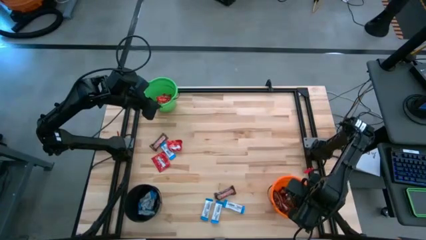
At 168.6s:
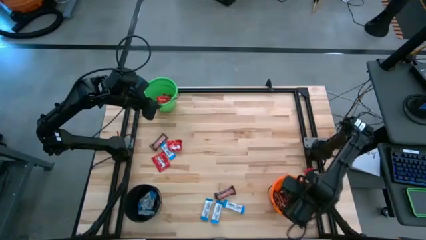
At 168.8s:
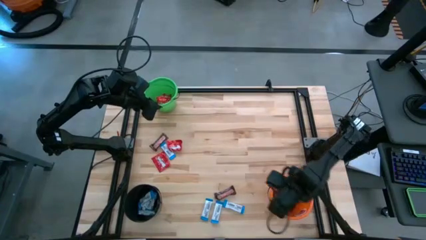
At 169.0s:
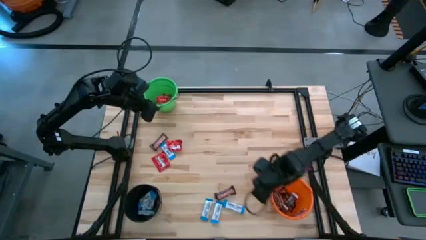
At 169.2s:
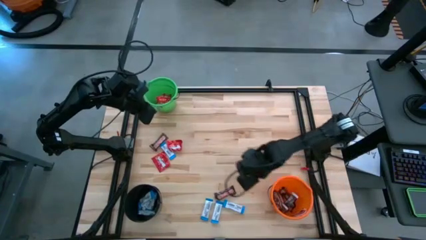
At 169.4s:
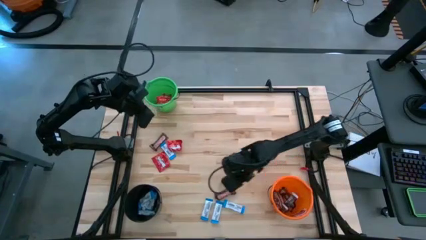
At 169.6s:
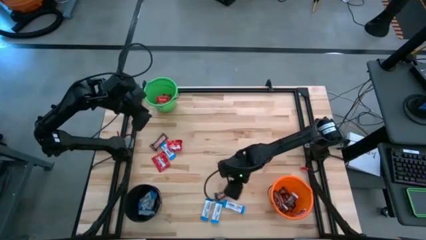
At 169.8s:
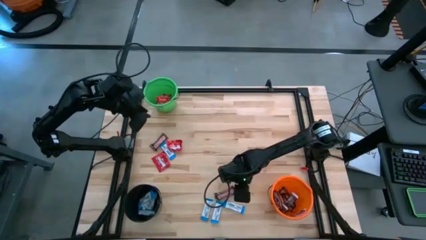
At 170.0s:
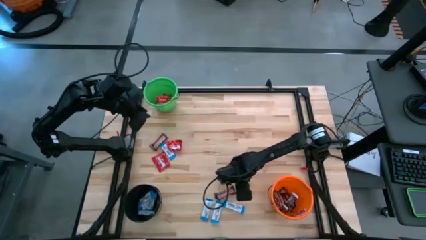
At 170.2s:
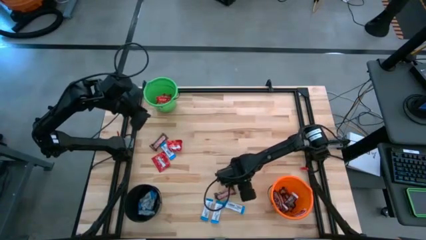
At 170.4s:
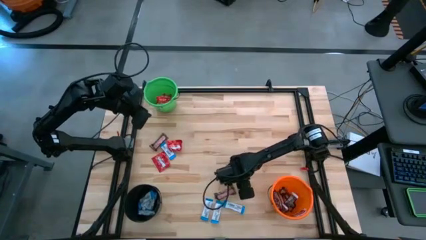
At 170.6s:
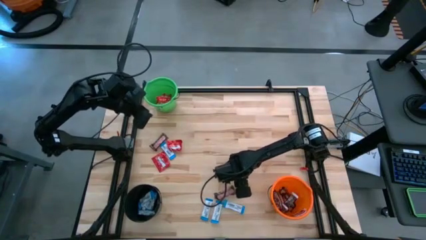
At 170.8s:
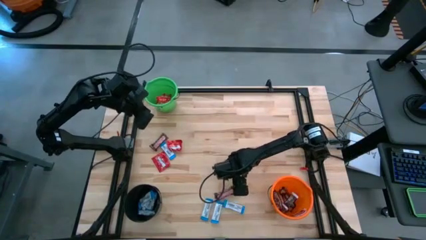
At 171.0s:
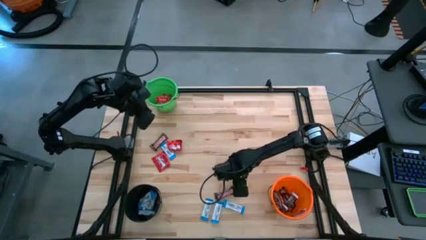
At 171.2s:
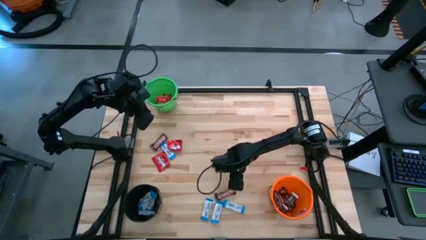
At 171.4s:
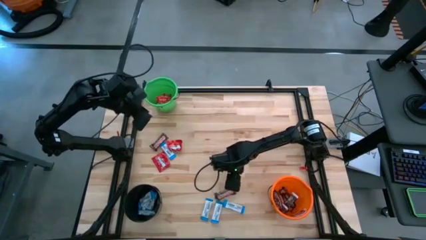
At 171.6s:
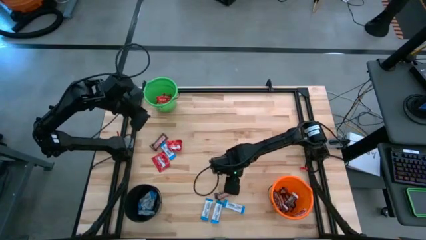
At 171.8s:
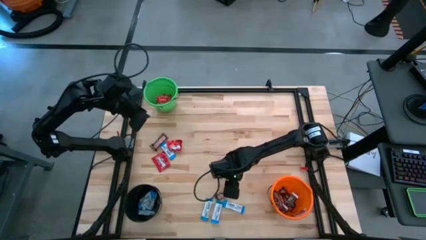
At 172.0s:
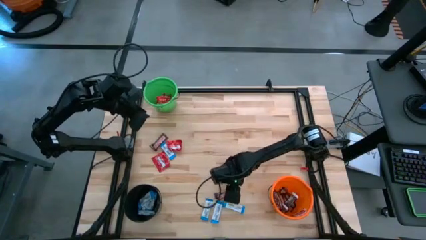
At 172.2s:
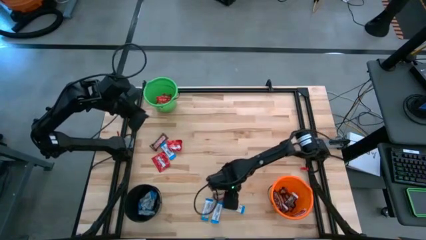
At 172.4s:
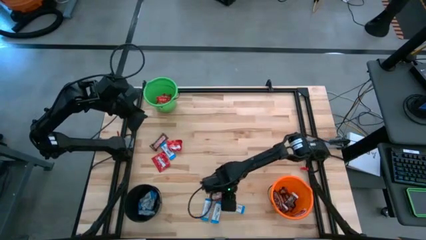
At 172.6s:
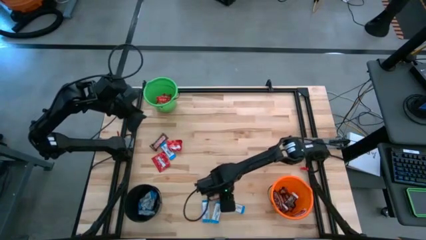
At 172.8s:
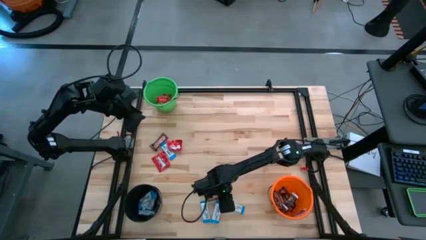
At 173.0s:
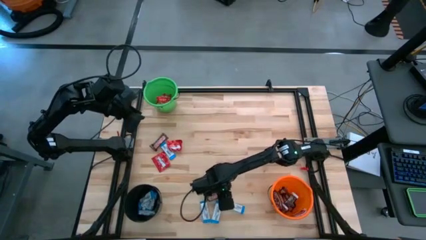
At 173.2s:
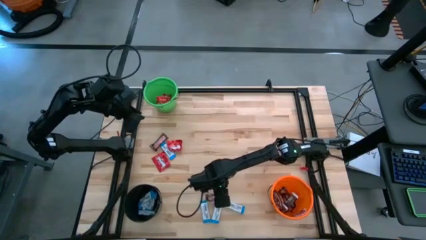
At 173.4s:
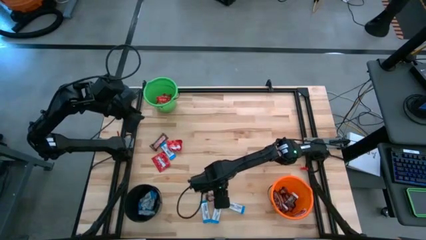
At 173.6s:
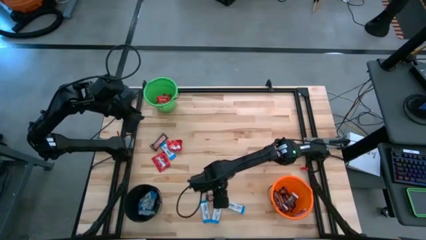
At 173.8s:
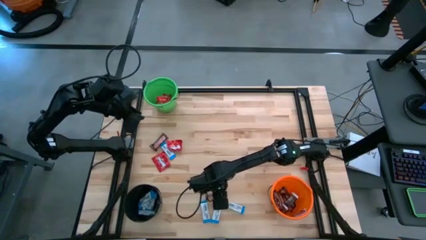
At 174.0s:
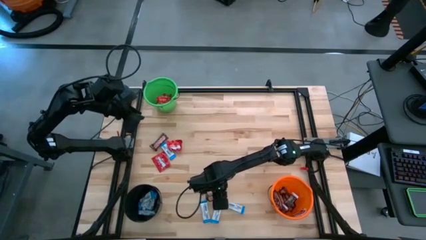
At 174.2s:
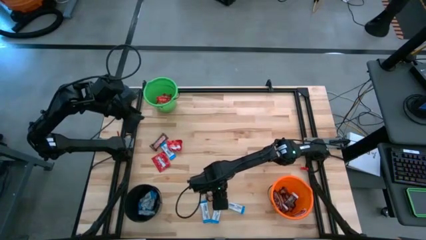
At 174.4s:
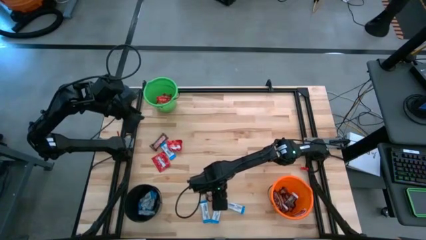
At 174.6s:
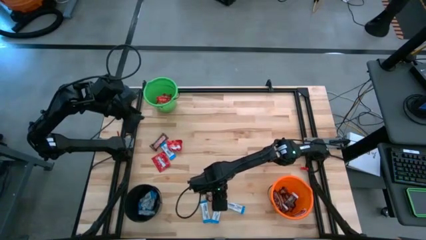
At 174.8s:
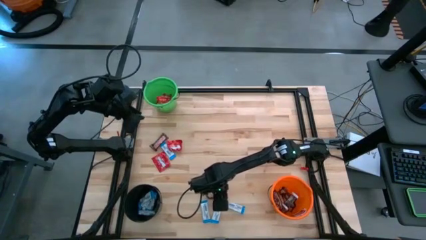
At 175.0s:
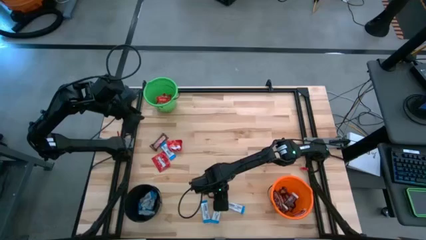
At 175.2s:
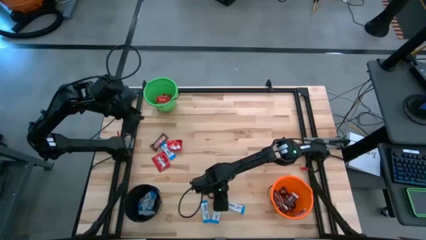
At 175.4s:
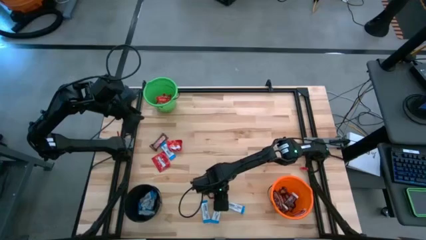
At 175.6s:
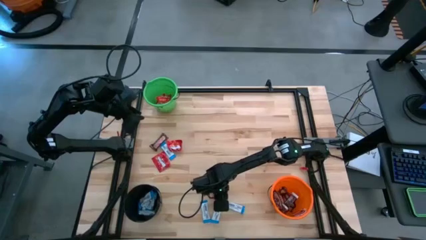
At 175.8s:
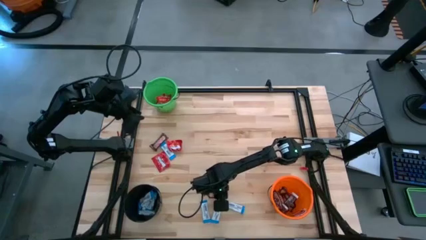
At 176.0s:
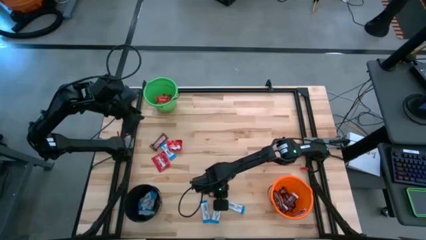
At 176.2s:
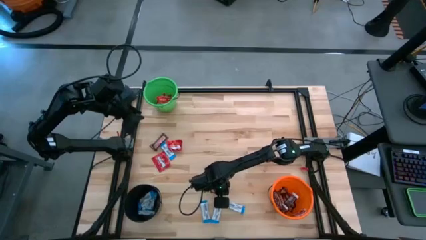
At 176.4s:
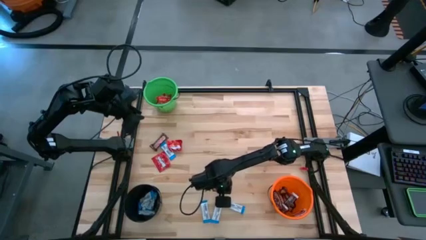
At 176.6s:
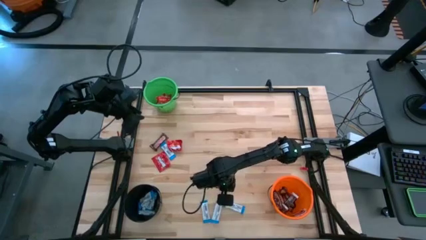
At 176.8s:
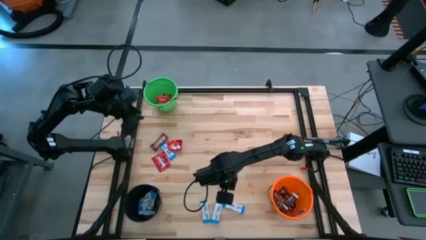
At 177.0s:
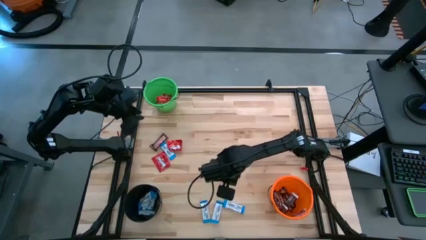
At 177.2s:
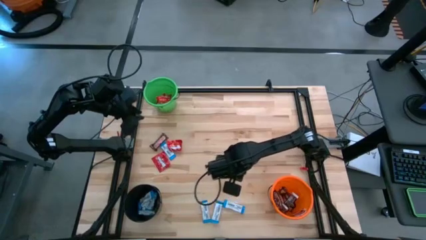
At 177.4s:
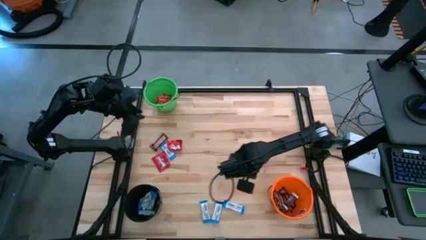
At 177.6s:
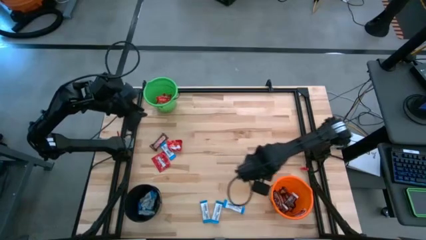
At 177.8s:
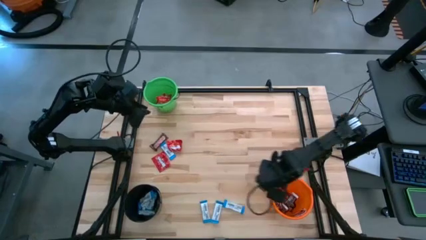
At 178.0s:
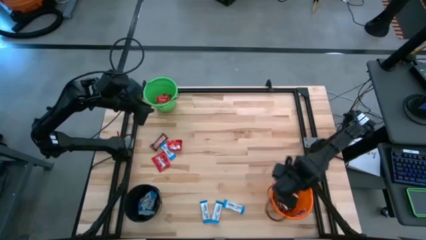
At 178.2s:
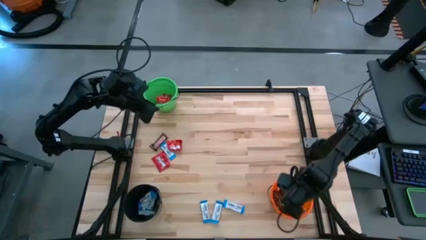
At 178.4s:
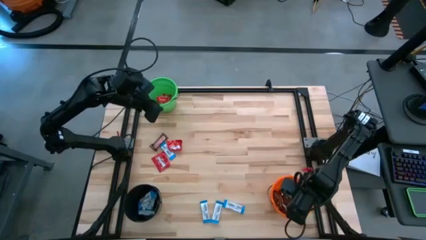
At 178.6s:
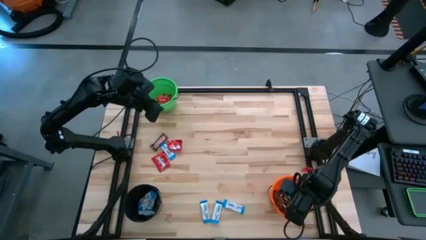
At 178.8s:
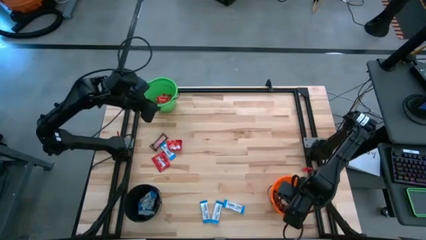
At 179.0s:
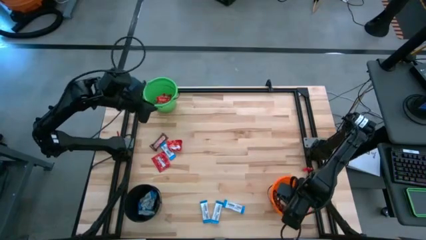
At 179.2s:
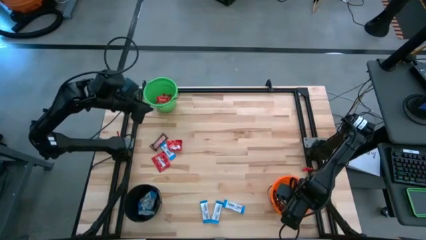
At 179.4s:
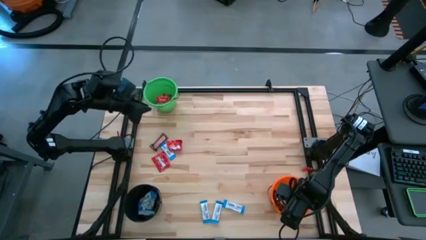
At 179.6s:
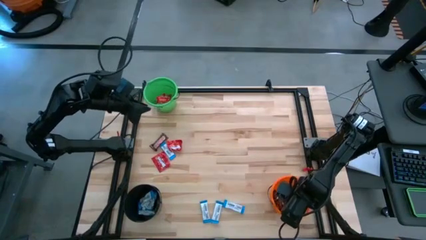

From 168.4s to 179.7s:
Task: Sort candy
Put the brown chocolate into the orange bucket

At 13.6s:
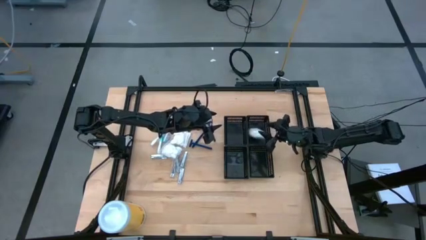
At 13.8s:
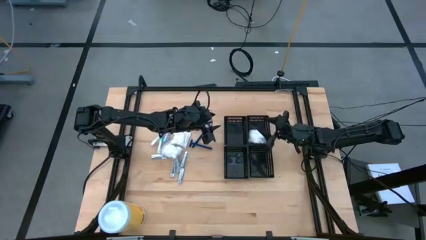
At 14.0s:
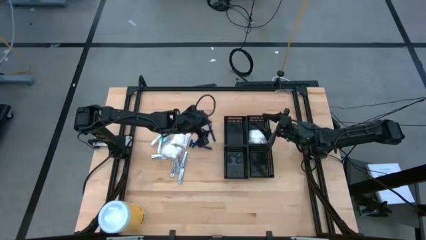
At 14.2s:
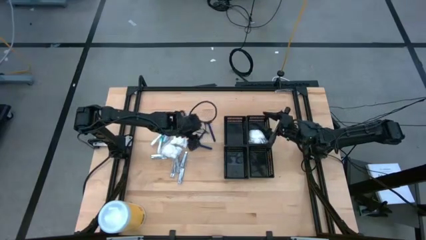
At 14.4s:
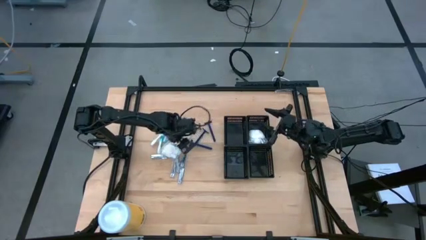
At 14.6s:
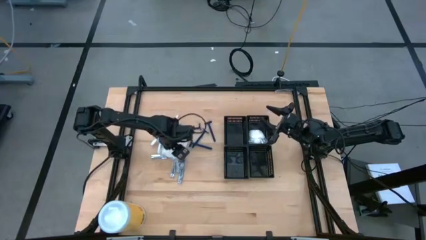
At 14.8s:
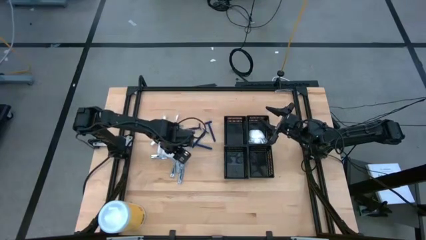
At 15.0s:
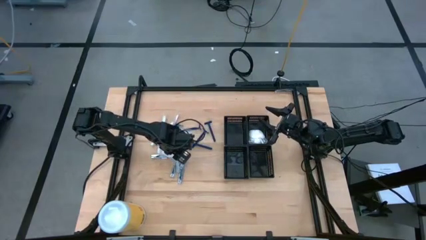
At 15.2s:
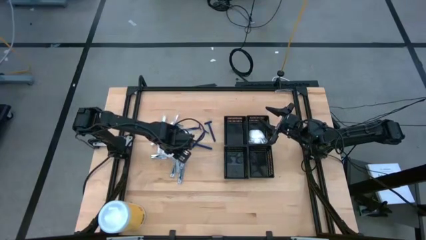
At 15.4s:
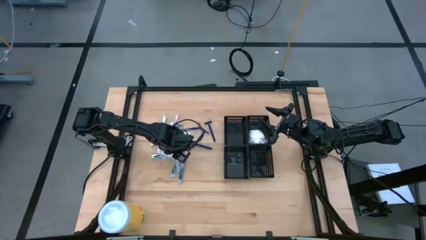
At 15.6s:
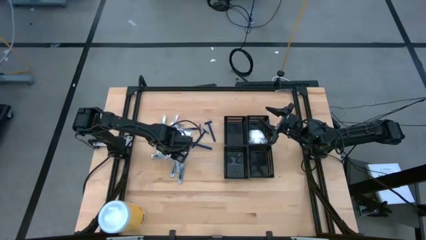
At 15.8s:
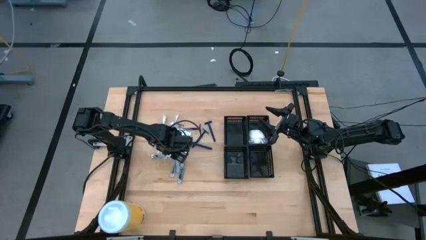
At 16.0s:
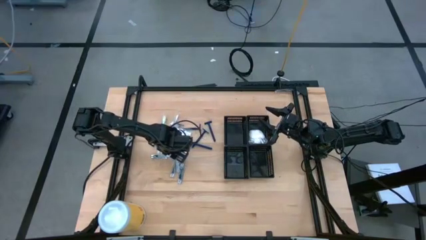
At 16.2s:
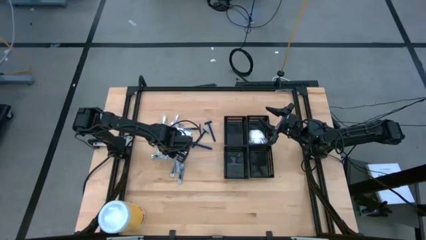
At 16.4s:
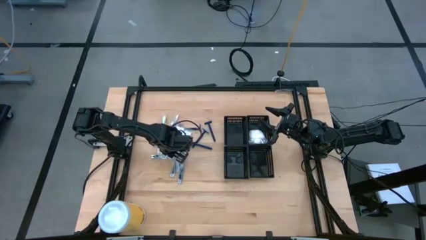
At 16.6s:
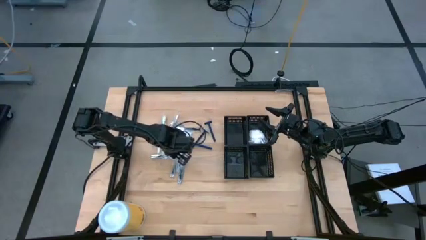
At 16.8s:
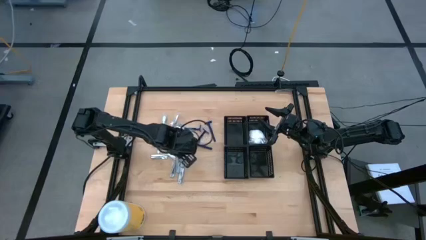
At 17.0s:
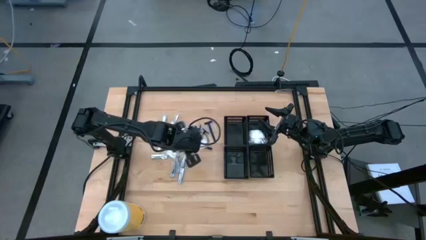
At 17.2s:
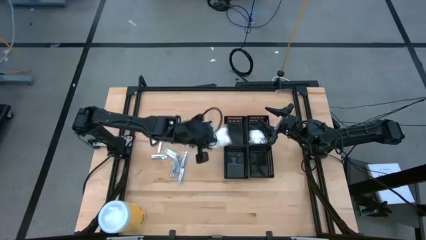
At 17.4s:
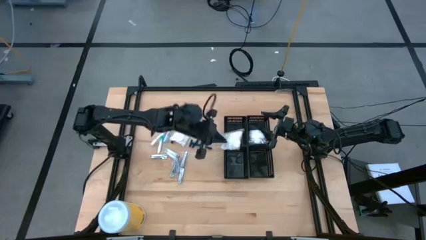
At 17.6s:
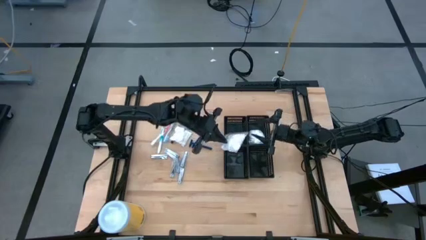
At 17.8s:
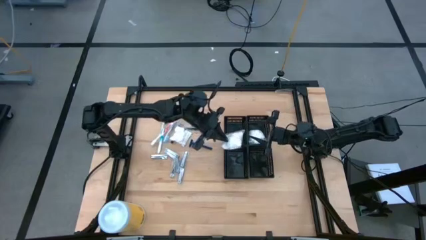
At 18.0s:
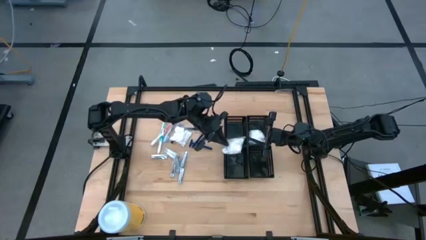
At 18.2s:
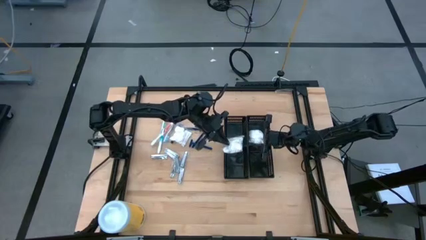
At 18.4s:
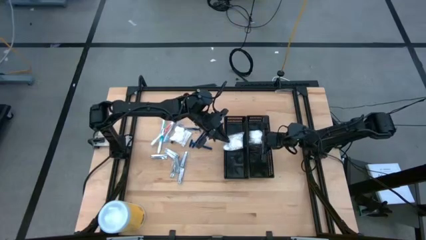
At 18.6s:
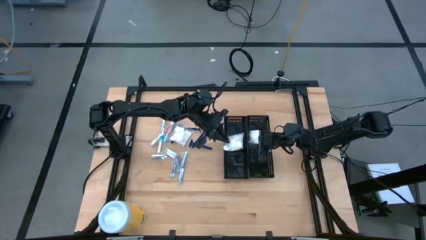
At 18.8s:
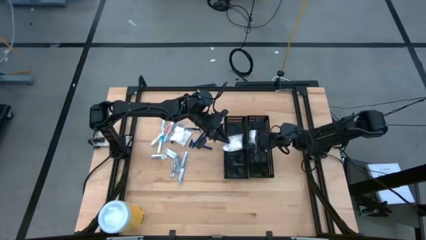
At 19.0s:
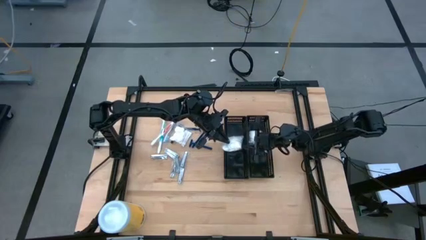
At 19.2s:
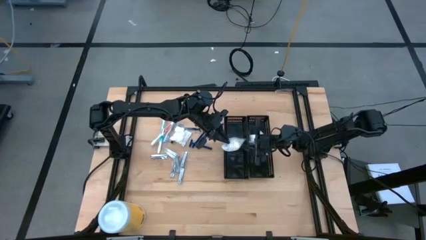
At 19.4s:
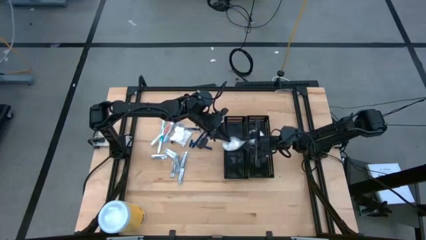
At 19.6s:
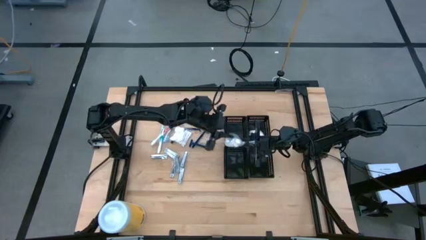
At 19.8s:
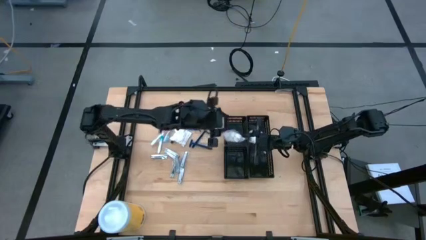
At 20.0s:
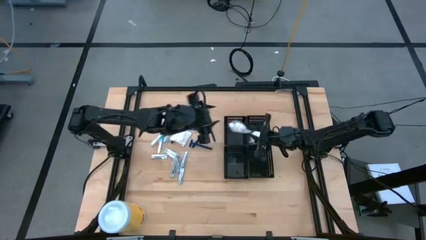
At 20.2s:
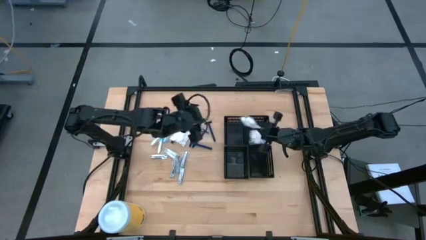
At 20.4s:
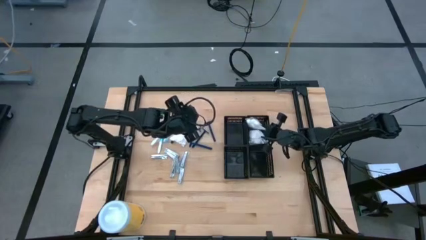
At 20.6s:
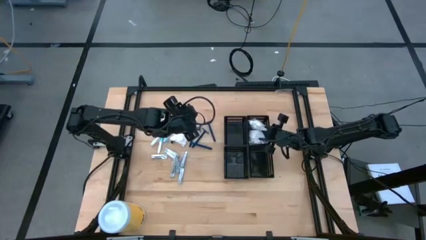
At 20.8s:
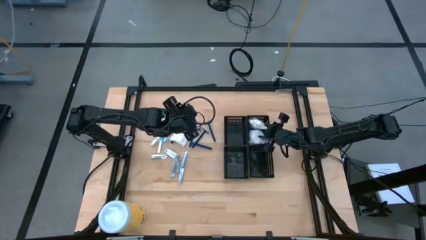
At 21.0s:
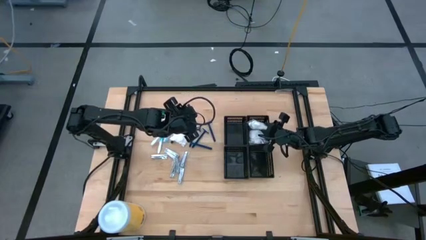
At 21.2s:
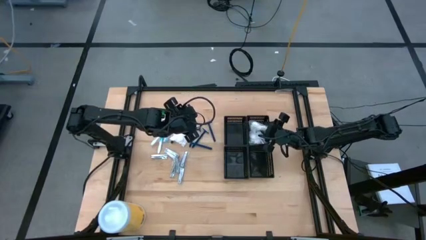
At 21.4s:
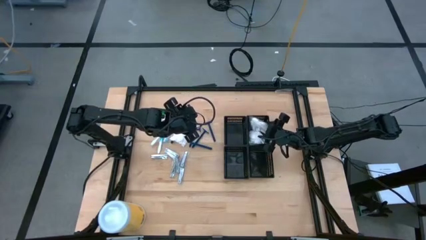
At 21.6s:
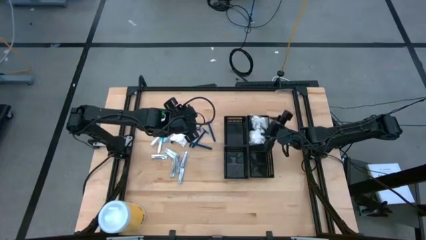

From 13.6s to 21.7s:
Task: Pick & Place Travel size toiletries
Put the cotton pack into the top right black basket
